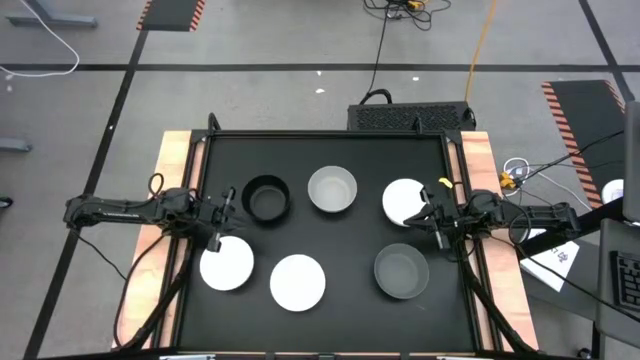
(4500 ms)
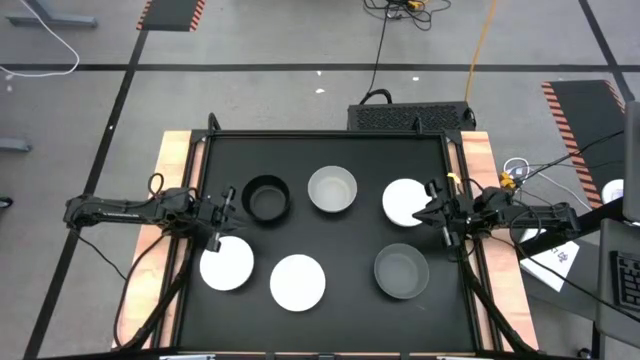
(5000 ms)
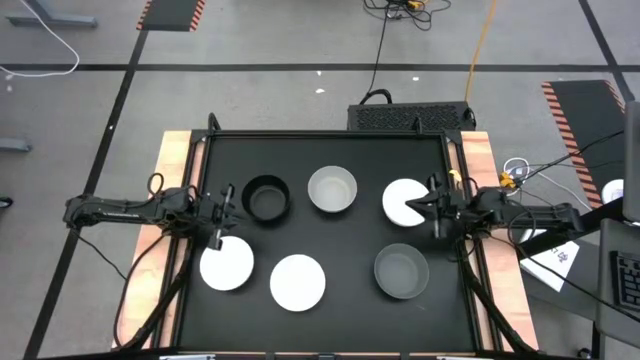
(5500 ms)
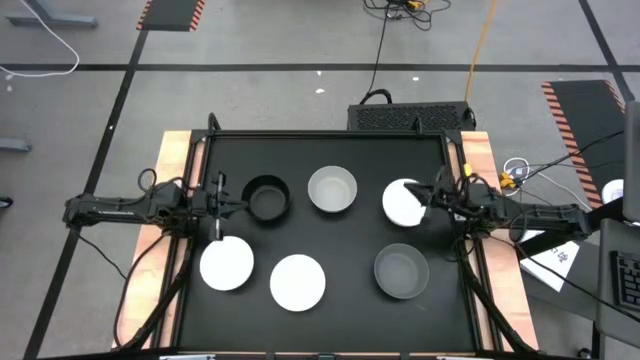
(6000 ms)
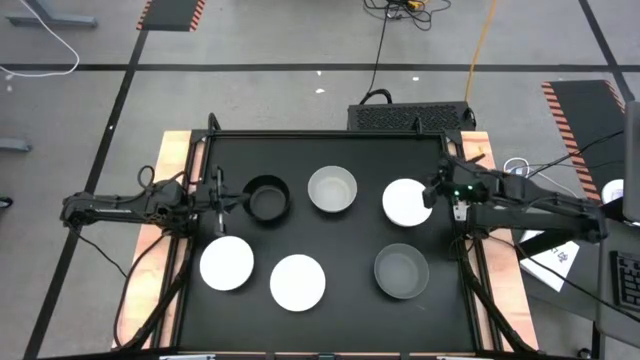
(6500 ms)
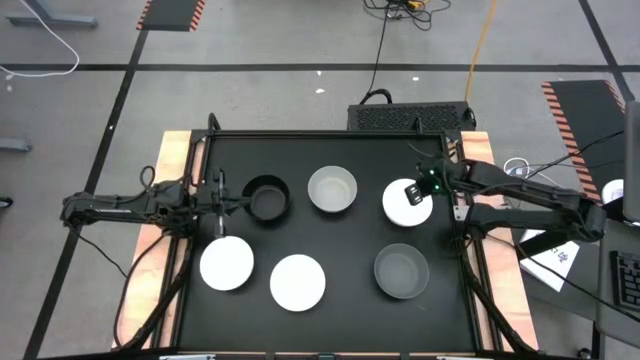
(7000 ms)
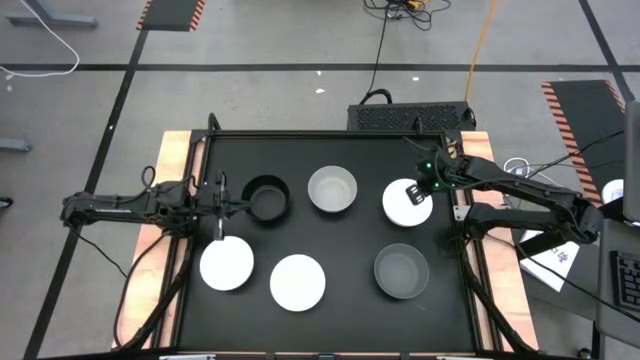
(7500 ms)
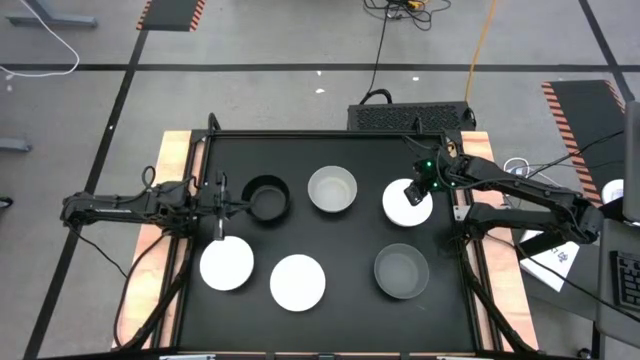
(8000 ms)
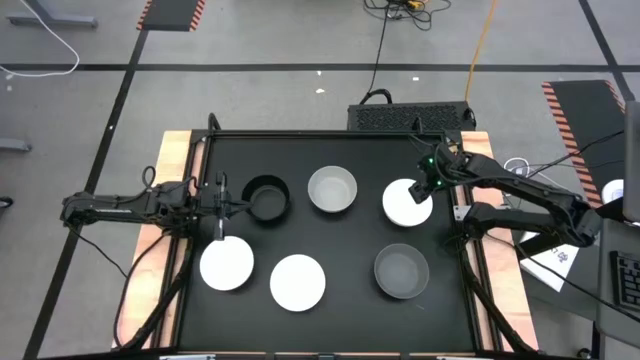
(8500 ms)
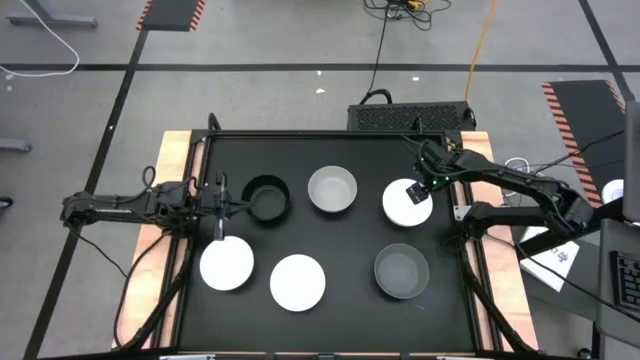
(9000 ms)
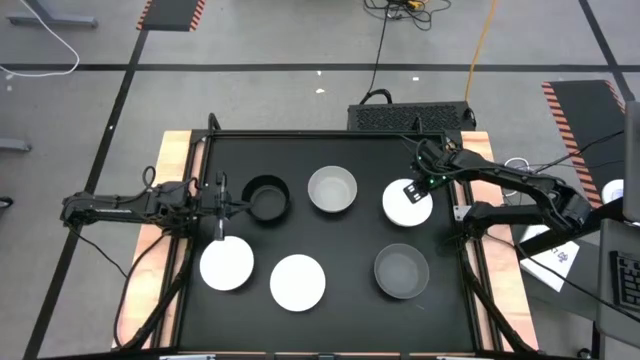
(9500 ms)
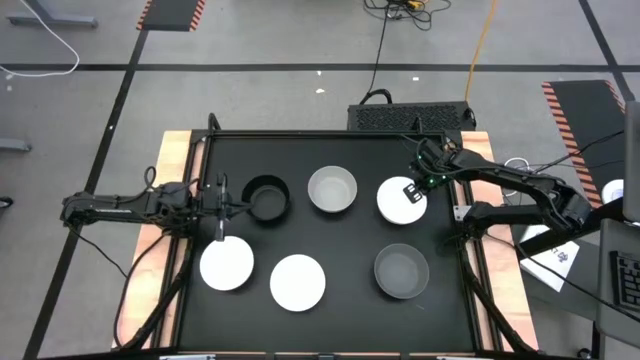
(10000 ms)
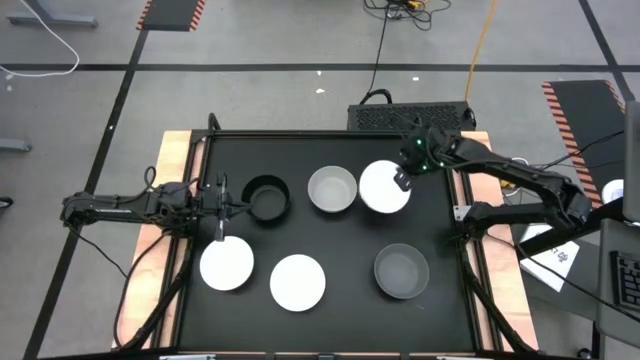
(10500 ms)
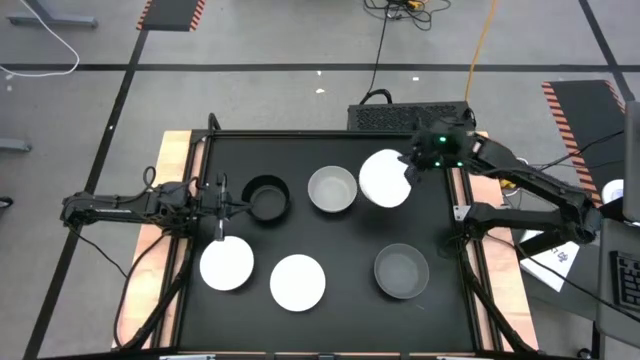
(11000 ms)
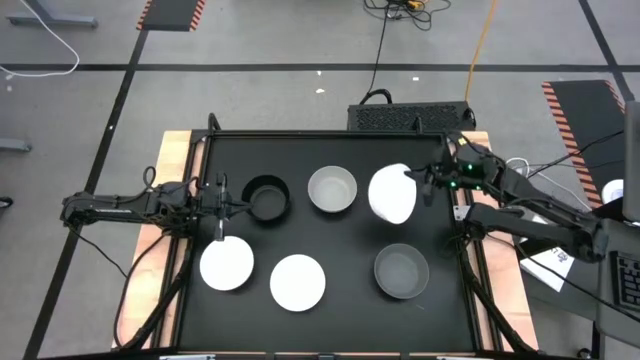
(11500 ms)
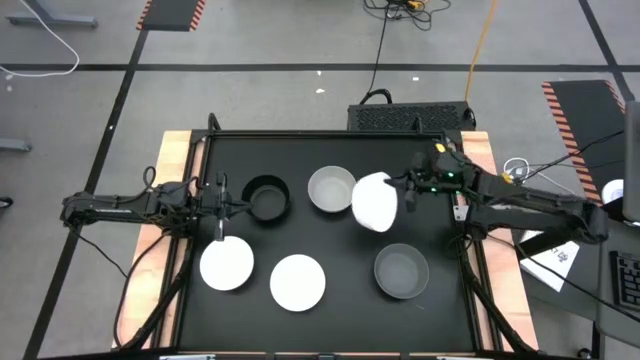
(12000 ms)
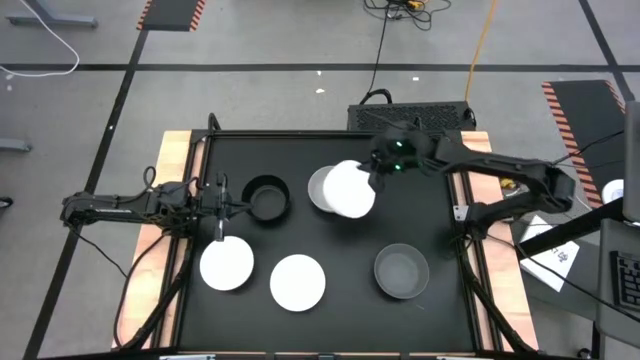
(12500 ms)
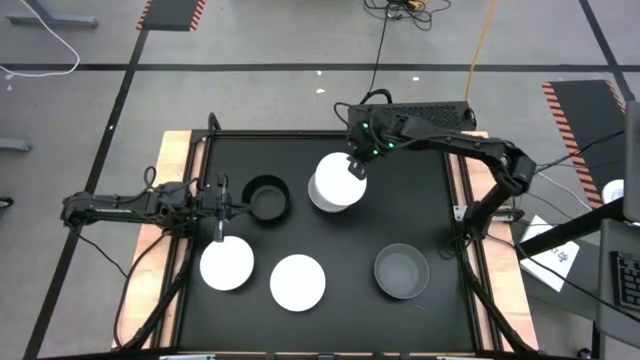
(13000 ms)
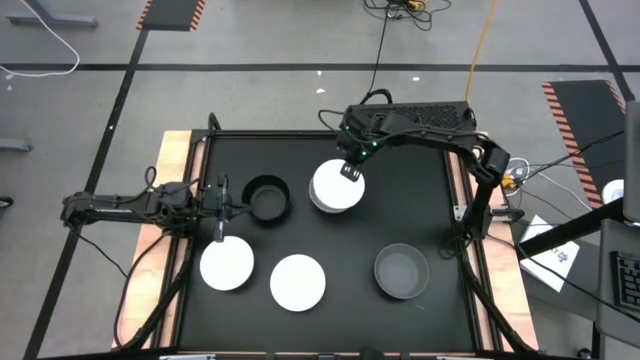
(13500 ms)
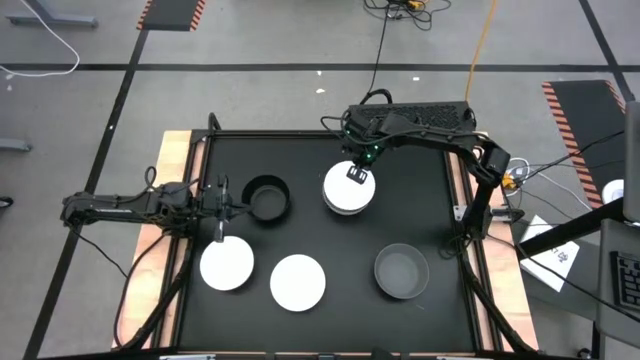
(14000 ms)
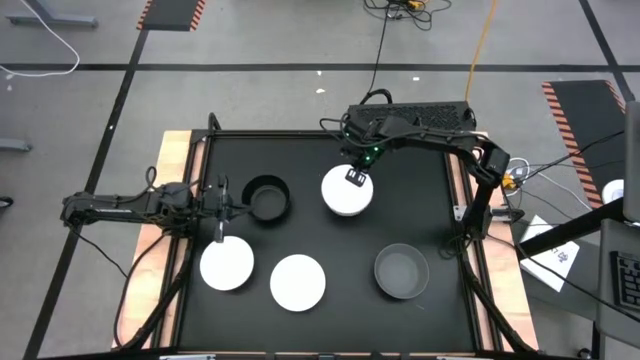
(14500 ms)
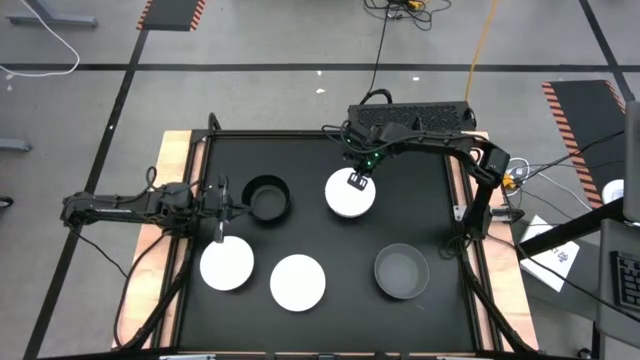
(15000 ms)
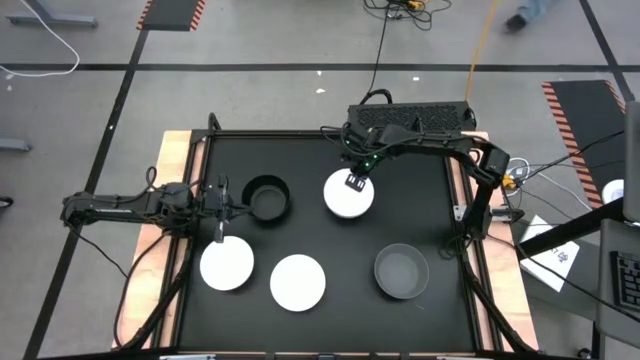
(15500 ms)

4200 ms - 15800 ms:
Task: Nest bowls inside each other
Stack the top right white bowl on the light gray bowl

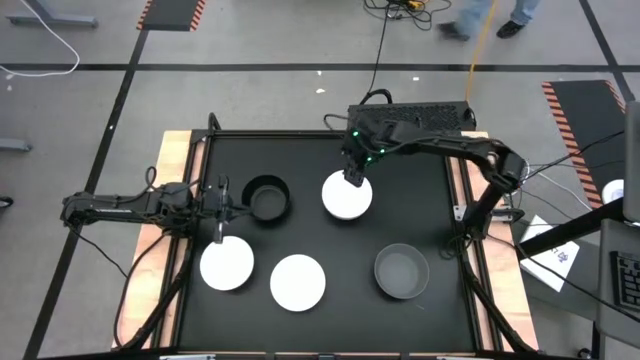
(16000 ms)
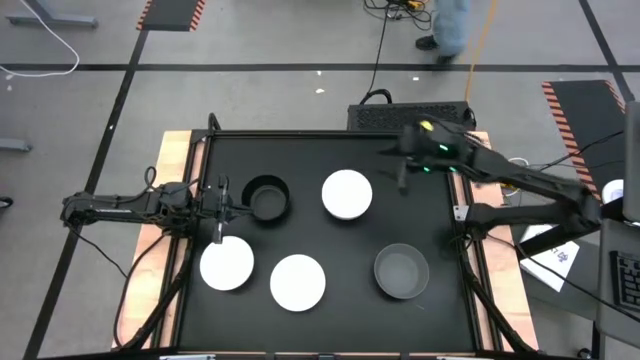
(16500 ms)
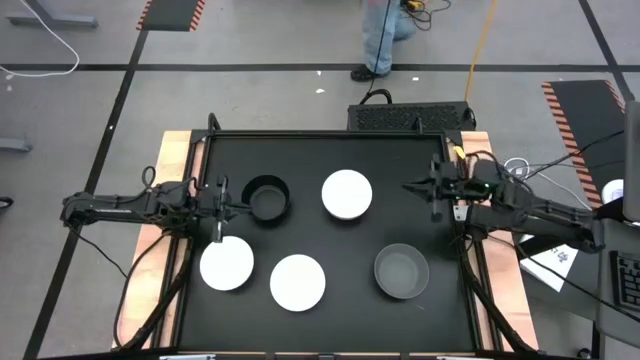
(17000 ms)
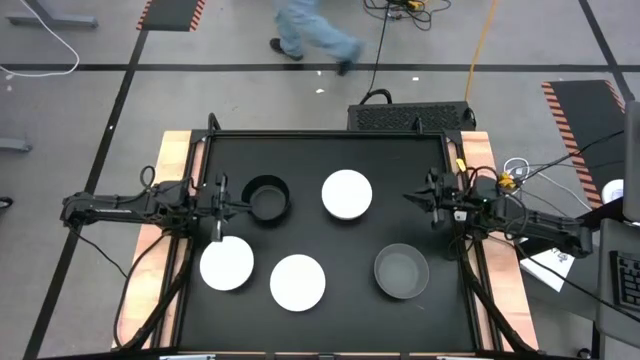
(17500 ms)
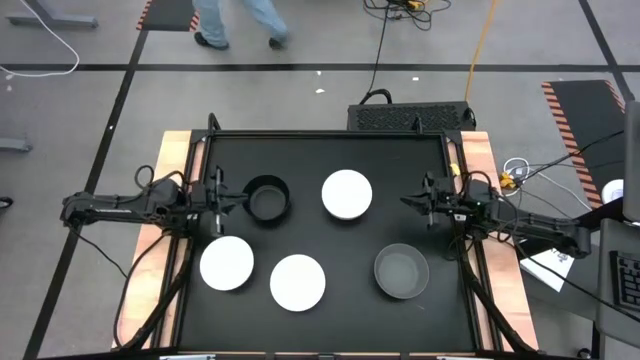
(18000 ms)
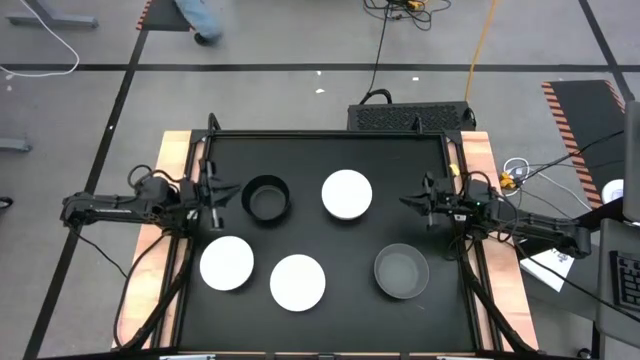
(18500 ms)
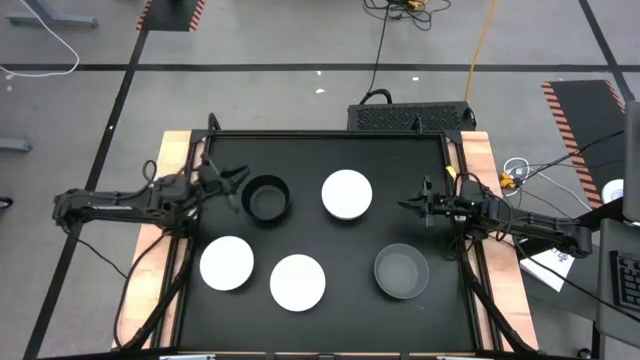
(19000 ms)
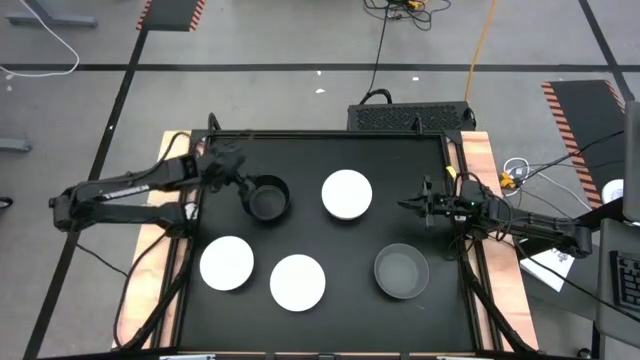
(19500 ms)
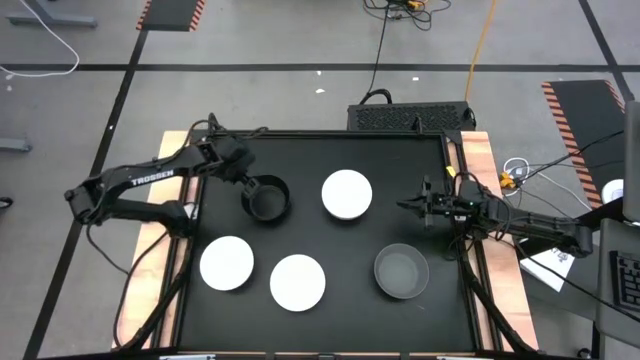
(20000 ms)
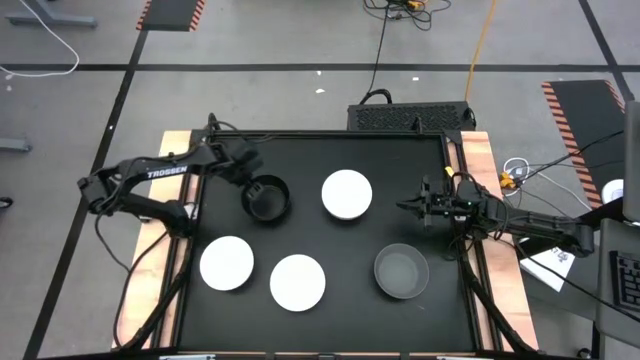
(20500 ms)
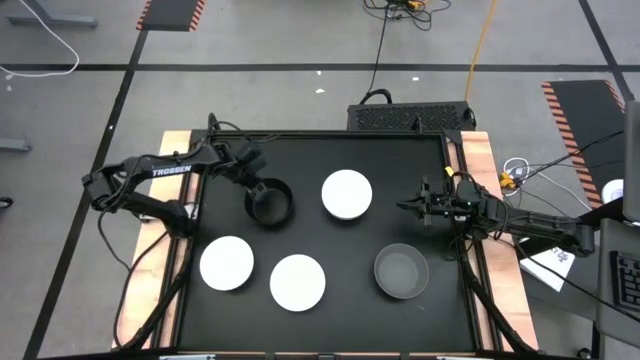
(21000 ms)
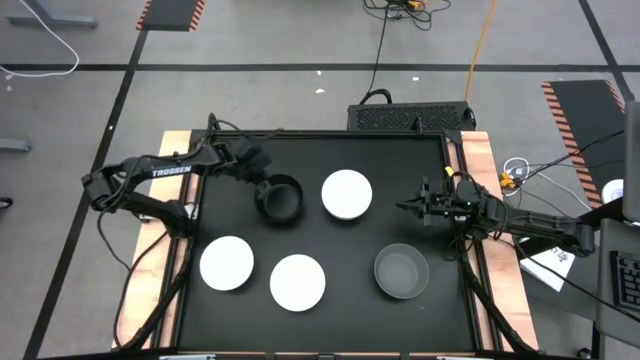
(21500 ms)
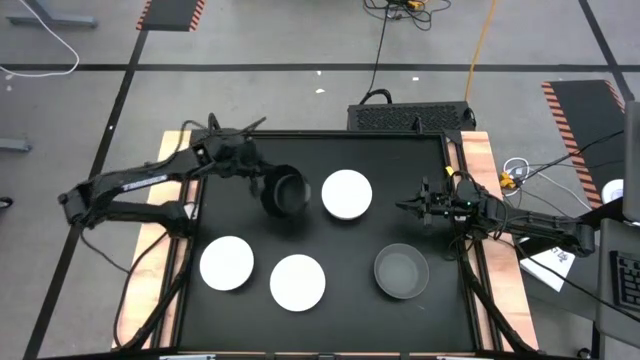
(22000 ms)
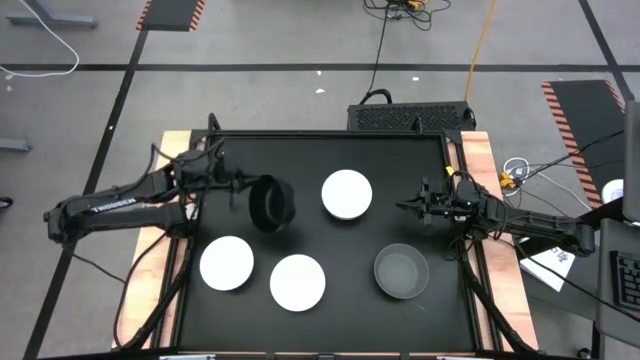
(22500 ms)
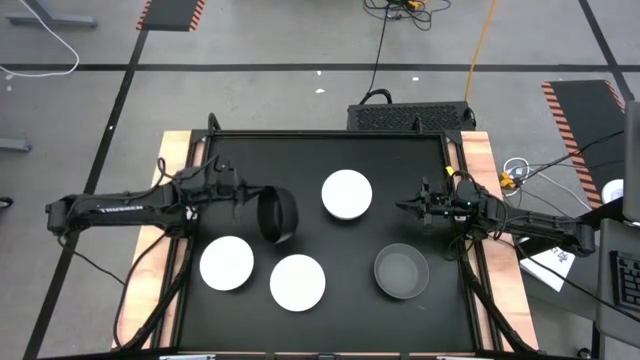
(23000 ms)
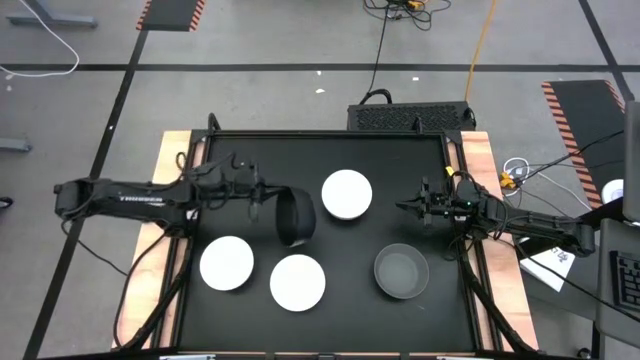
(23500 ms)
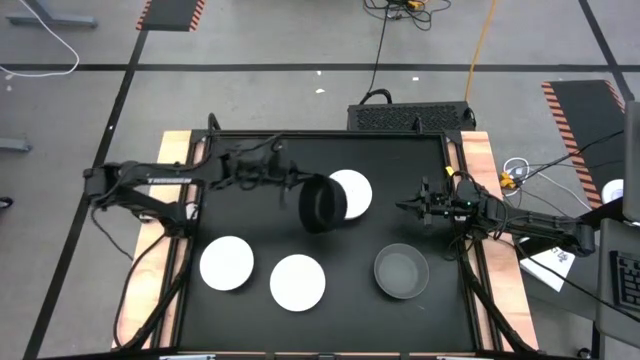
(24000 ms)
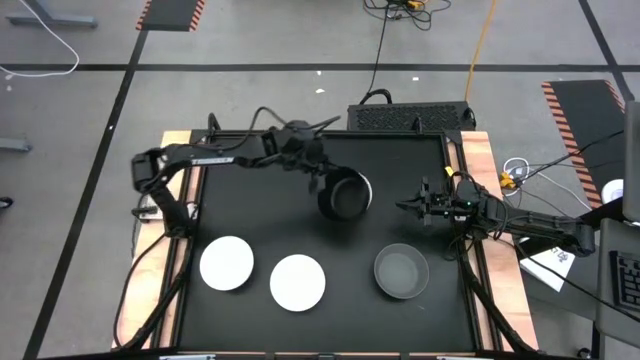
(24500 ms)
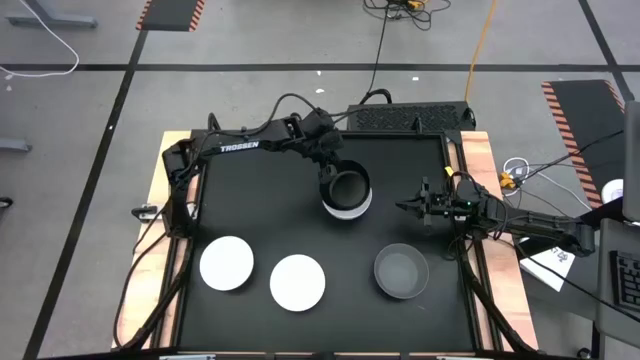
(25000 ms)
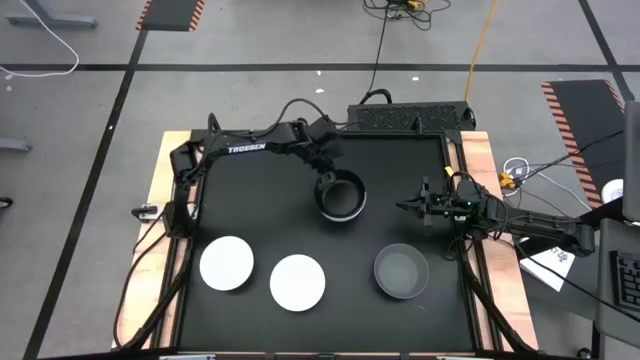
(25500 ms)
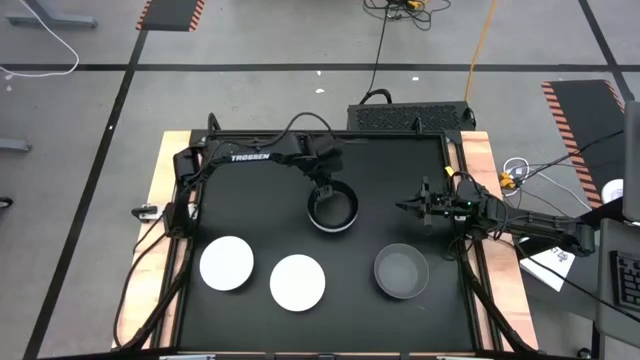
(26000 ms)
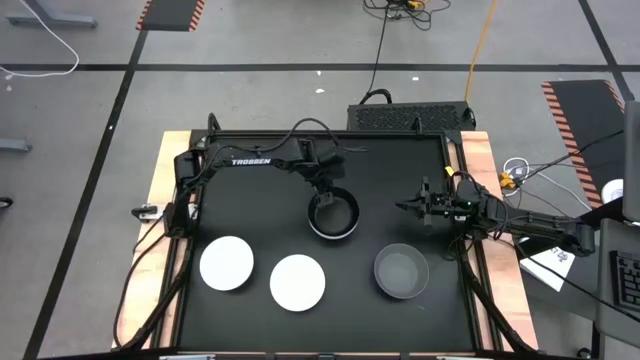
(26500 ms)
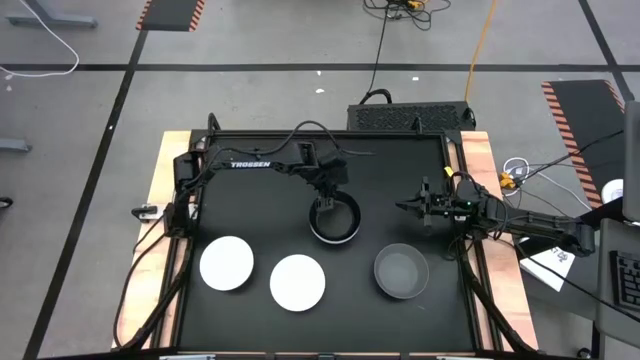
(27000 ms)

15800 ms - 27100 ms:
Stack the black bowl on the white bowl
